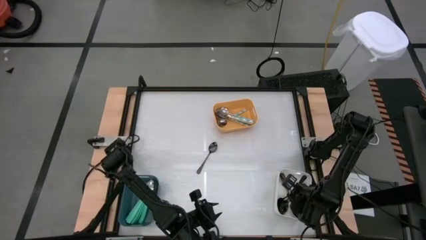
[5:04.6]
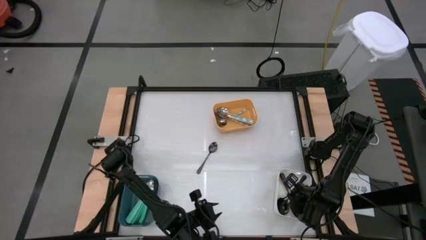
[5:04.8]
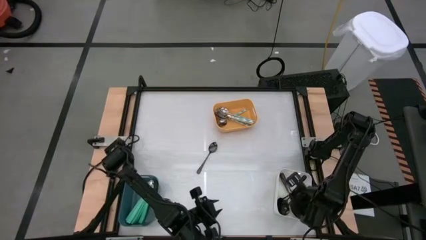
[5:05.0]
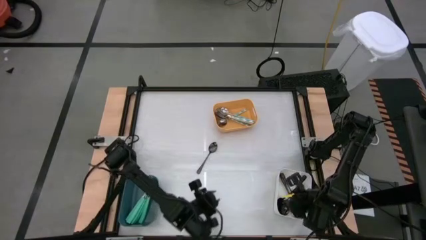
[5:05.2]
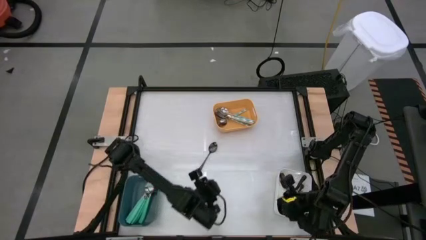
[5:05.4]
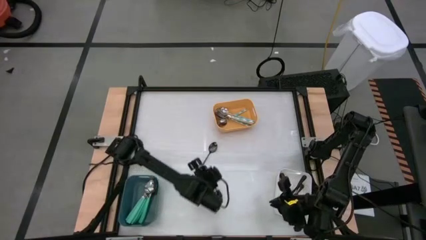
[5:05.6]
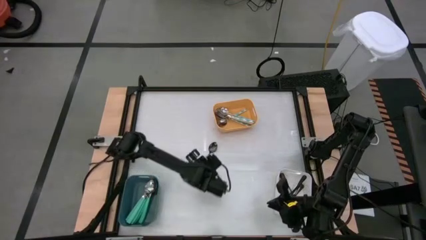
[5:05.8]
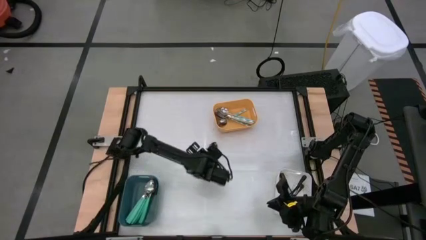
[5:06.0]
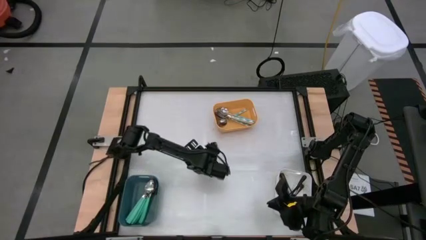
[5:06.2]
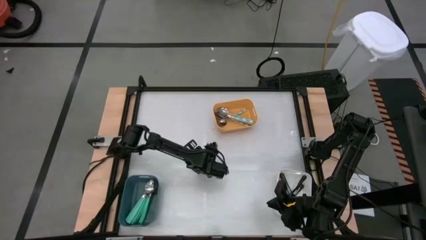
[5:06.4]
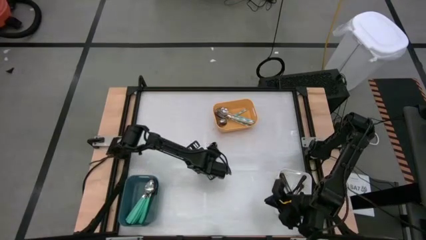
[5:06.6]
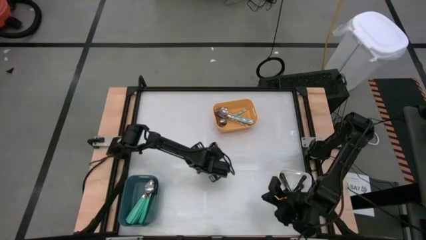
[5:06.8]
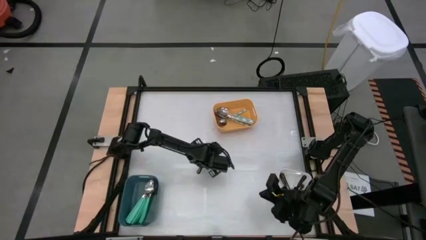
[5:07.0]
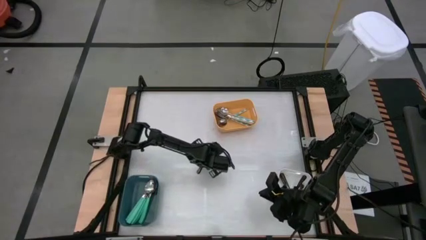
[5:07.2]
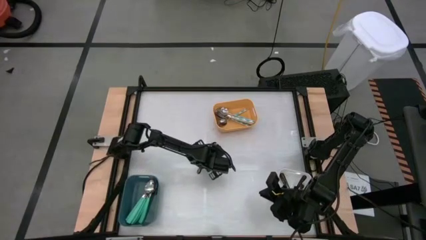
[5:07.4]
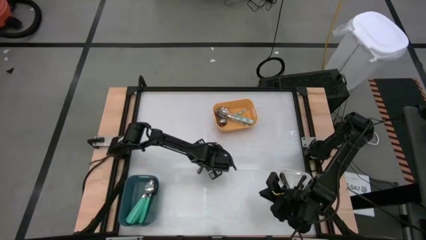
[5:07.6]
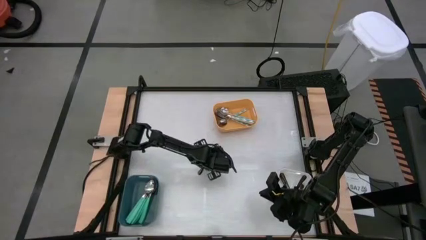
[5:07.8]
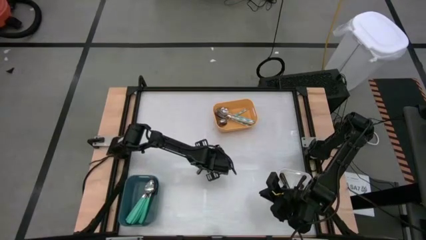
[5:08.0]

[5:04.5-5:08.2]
Task: Sort silverware by color (type)
Put the black spoon into the white bin

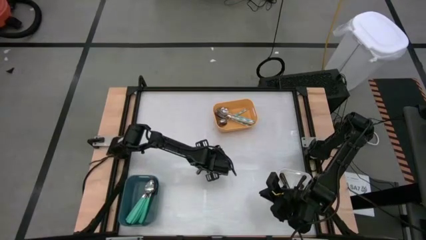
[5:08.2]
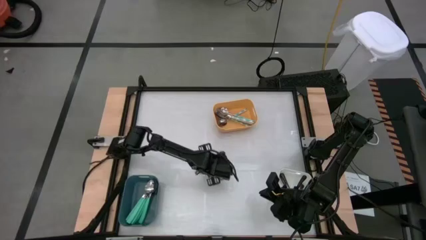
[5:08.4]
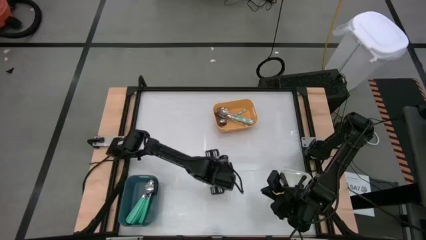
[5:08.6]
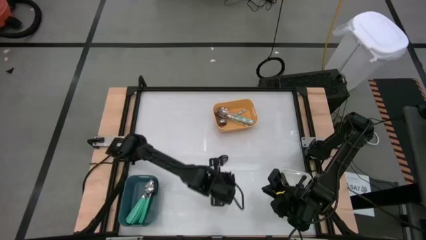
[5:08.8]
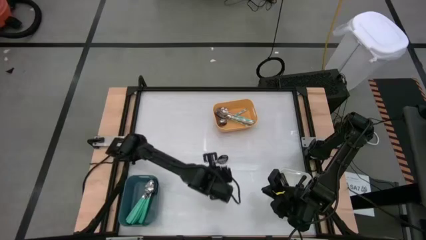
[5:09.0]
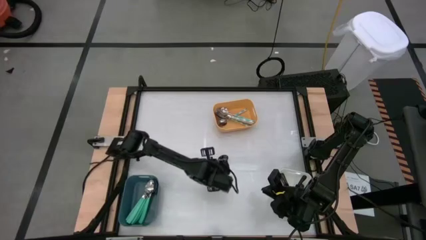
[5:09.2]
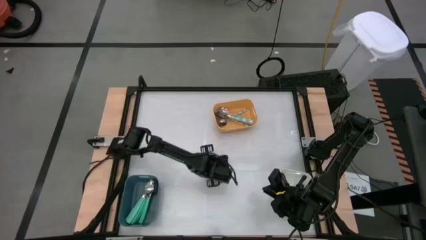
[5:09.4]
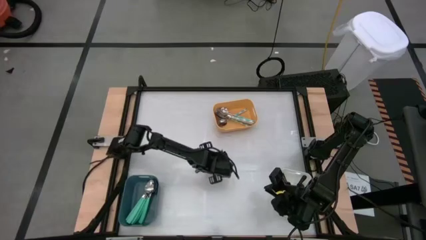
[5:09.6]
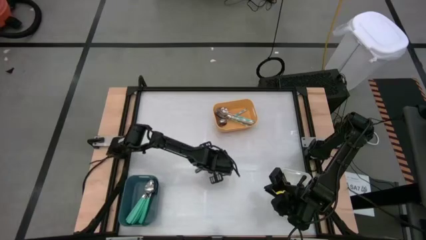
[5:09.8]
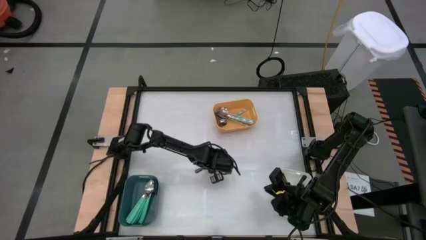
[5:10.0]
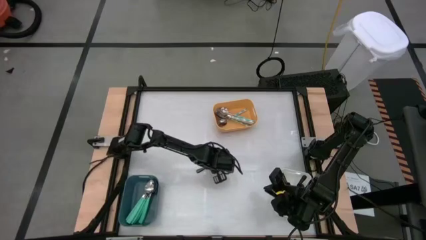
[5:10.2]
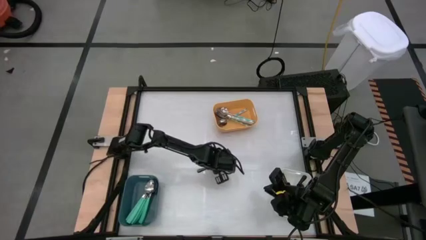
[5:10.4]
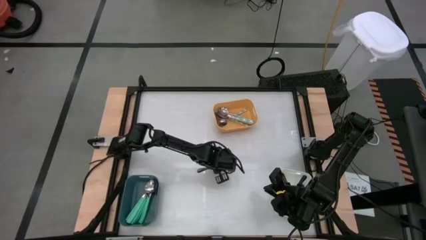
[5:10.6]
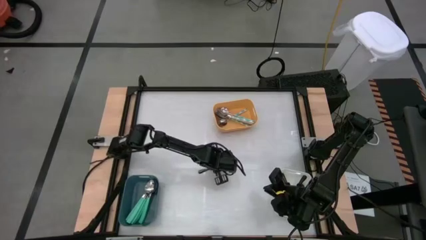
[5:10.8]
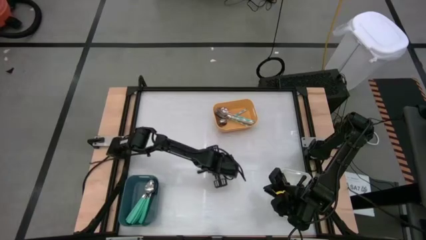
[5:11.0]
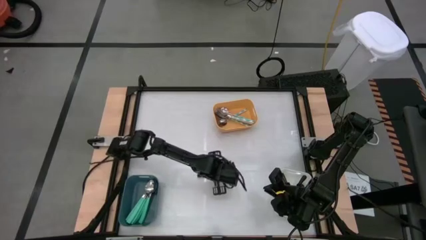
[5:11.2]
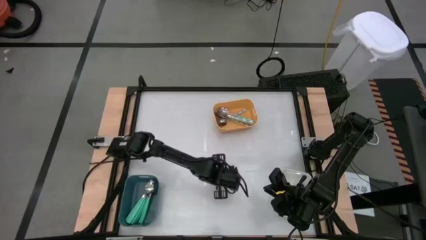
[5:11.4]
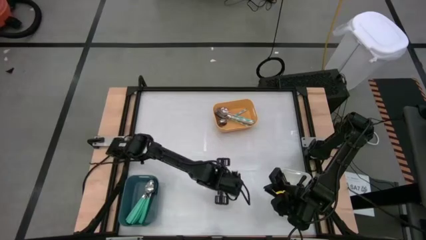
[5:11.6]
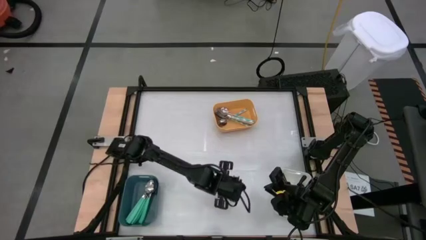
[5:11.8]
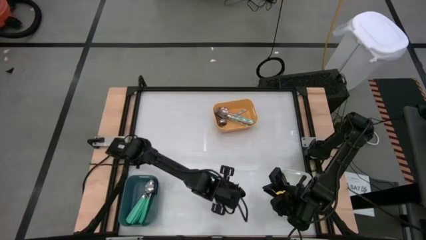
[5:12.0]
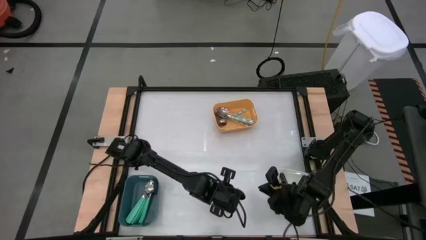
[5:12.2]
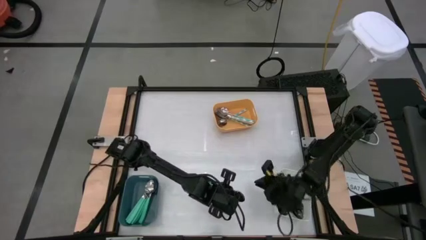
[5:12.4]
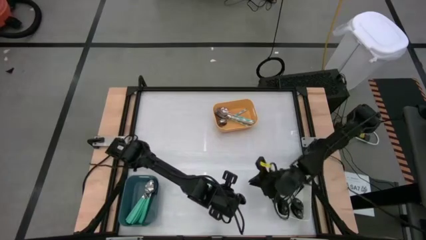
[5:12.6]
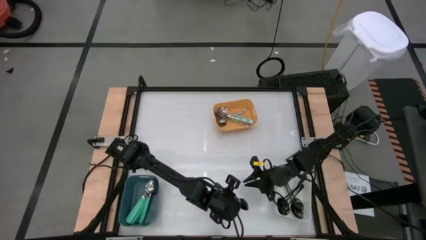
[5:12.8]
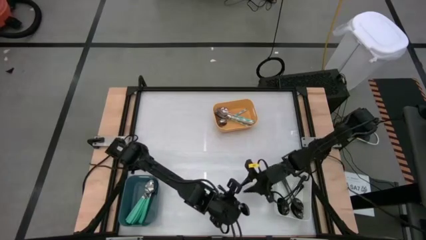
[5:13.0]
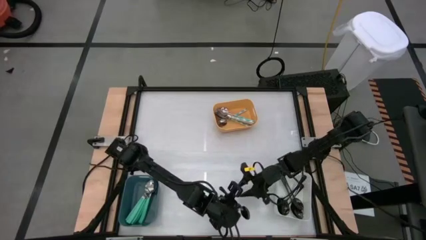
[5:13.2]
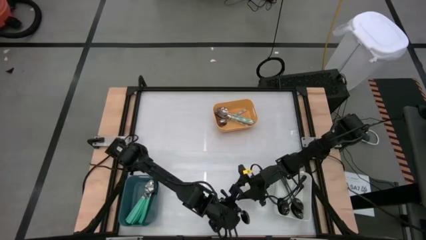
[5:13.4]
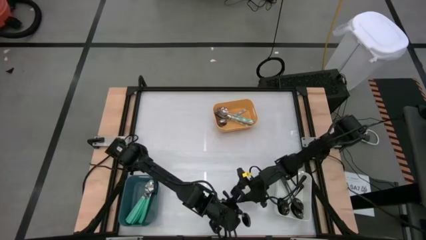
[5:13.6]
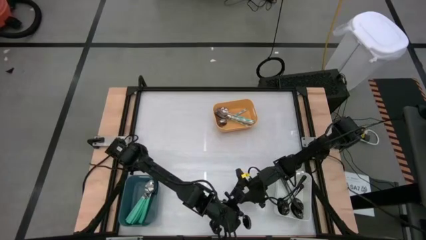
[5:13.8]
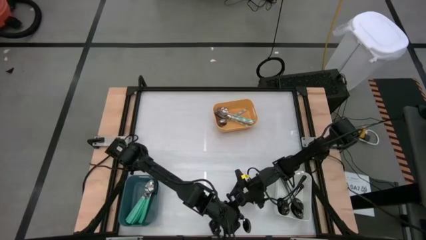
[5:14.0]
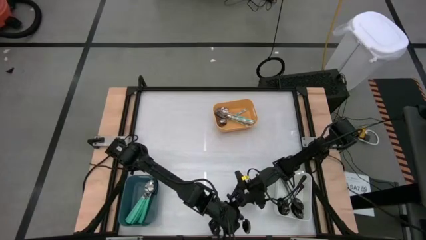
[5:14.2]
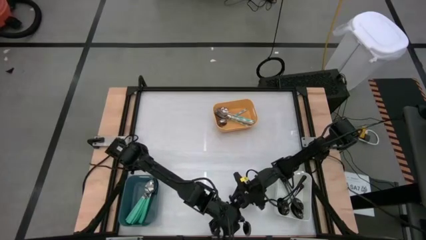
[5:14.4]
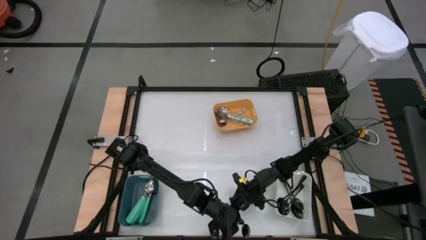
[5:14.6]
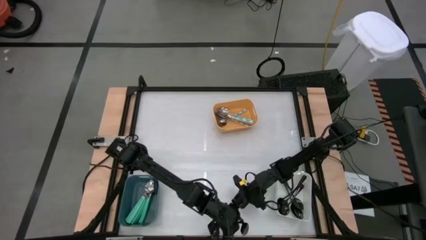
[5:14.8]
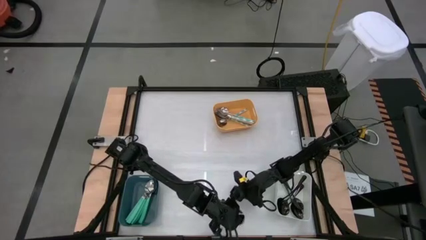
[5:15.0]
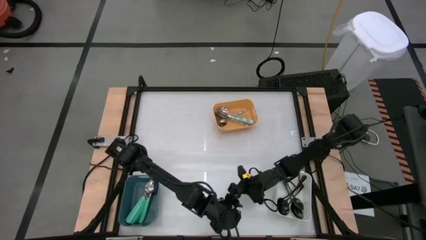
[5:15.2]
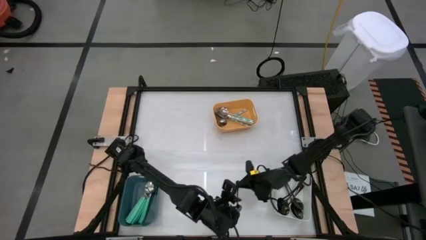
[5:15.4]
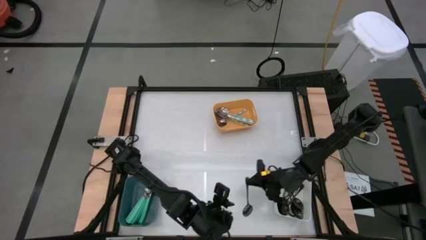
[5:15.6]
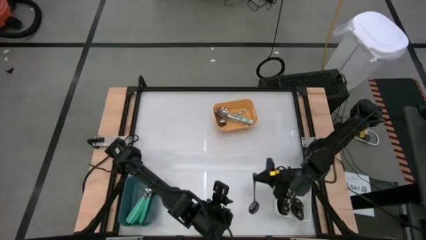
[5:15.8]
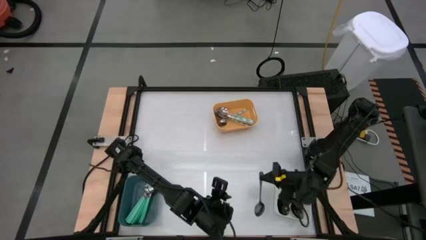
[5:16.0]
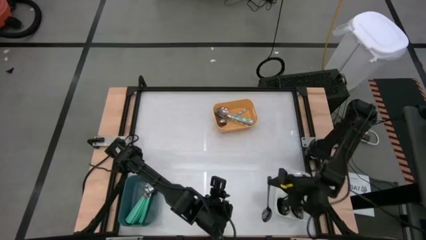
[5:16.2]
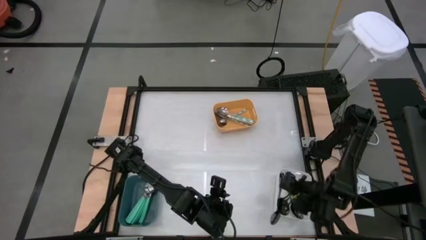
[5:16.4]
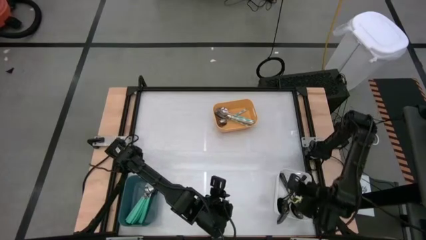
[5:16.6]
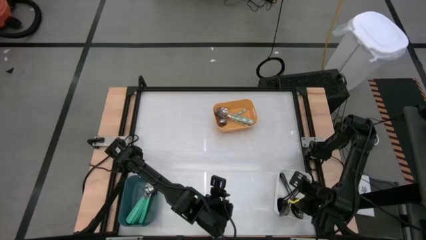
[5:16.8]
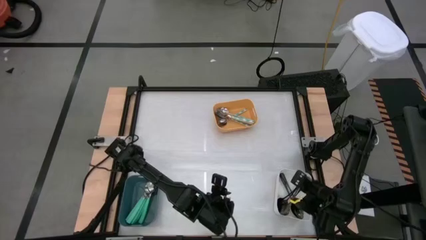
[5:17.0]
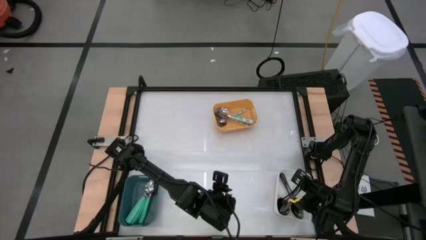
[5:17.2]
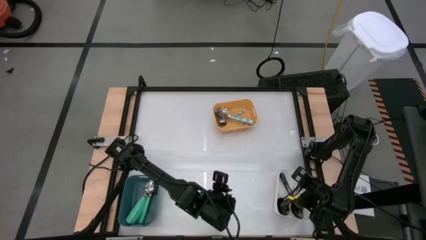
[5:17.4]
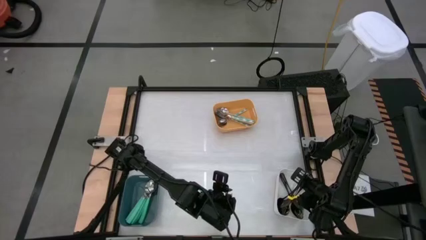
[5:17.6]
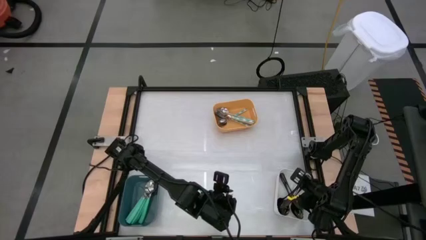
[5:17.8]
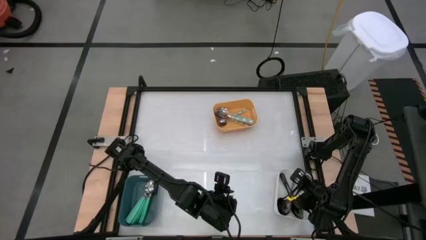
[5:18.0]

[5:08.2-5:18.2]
Put the black spoon into the white bin

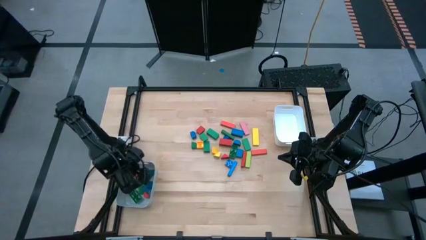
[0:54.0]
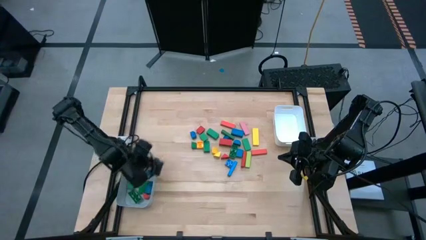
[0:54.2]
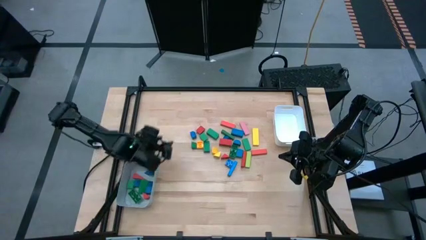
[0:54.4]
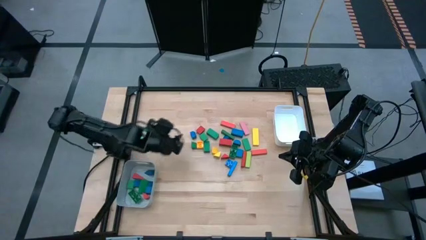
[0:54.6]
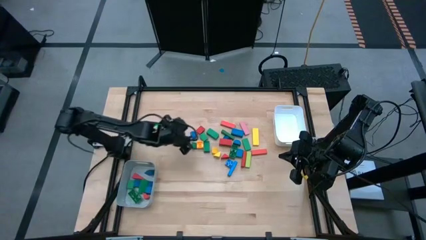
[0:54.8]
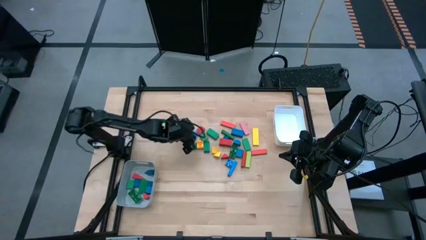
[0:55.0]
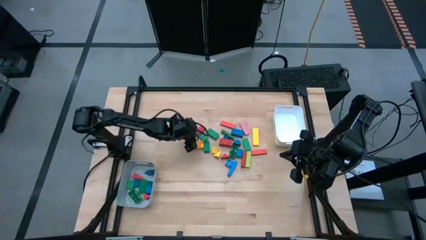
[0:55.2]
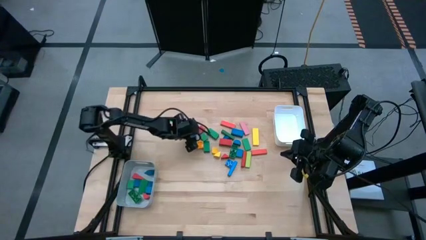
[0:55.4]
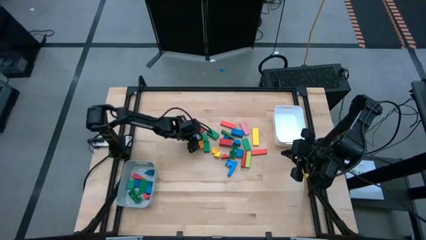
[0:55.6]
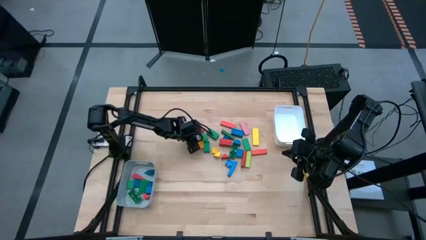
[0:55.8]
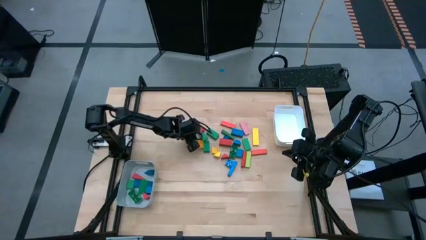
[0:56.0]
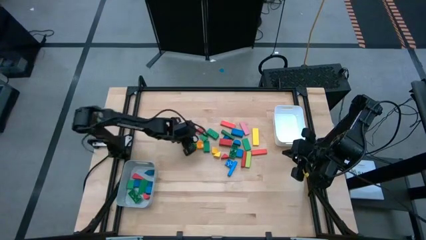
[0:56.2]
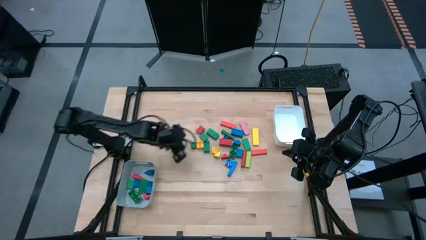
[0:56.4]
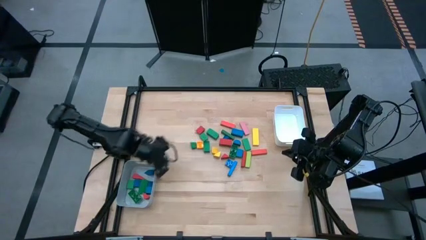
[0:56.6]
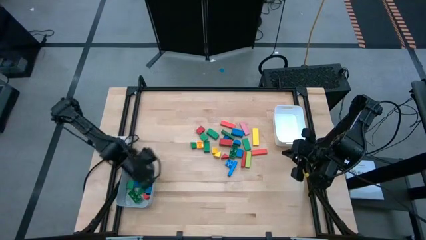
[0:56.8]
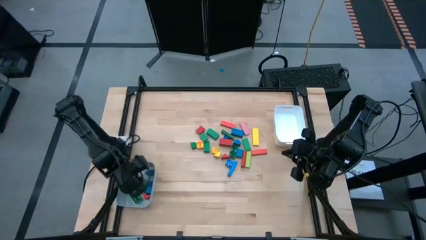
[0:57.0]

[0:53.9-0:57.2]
Task: Sort blocks by size
Put the blue game piece into the gray bin

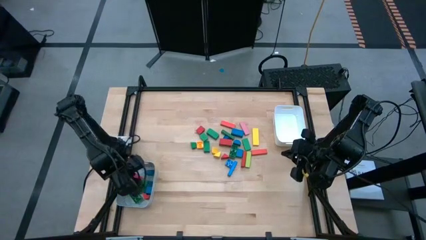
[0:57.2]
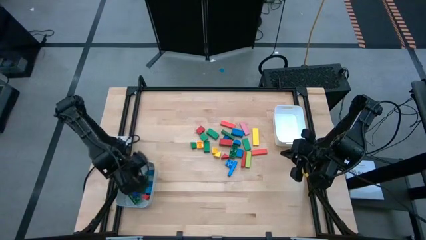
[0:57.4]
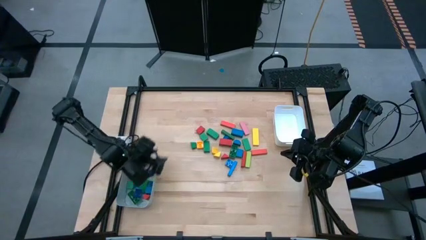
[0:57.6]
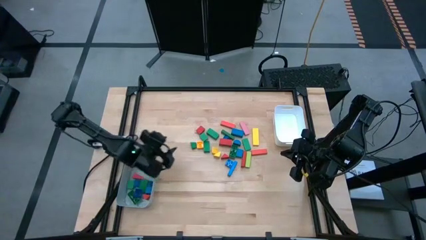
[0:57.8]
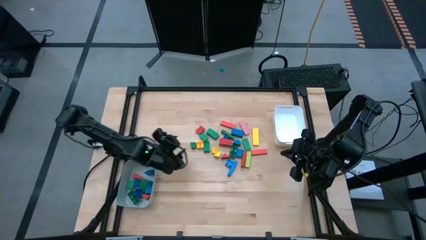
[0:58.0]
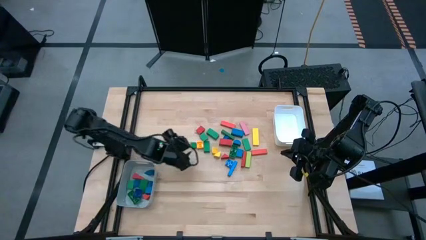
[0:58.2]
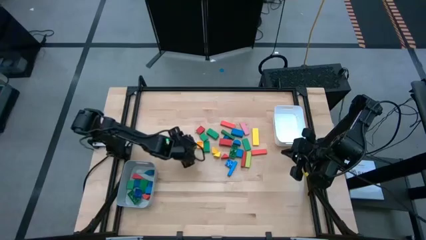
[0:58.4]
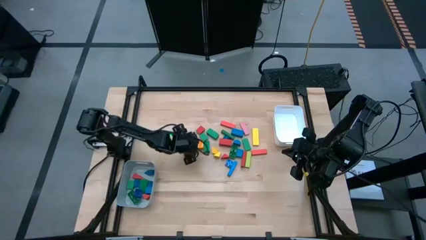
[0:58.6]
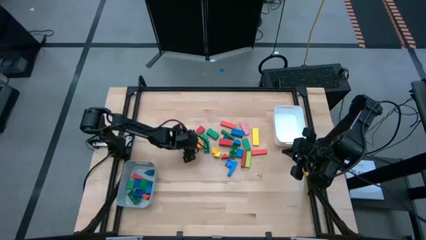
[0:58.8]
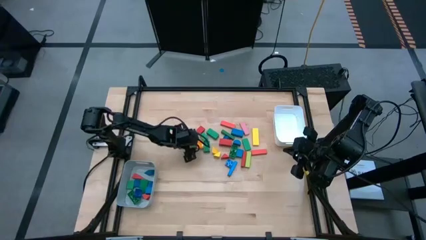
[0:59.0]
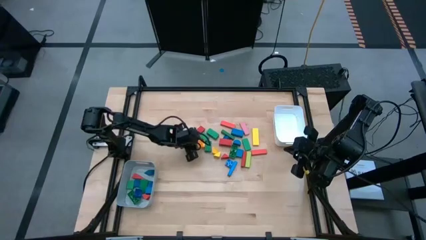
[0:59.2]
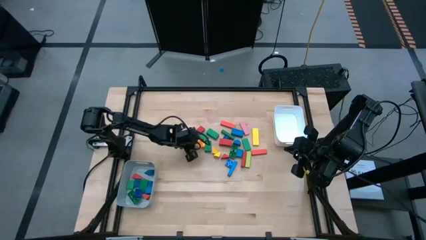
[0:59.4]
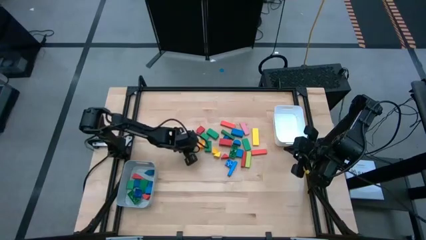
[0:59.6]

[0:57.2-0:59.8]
Put the green triangle block into the gray bin
